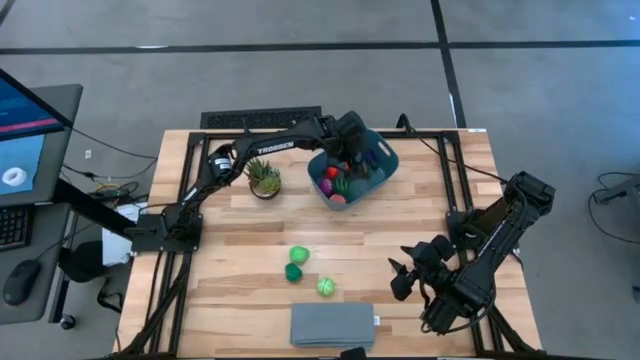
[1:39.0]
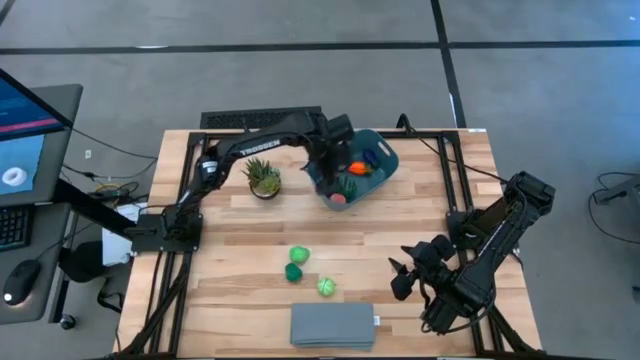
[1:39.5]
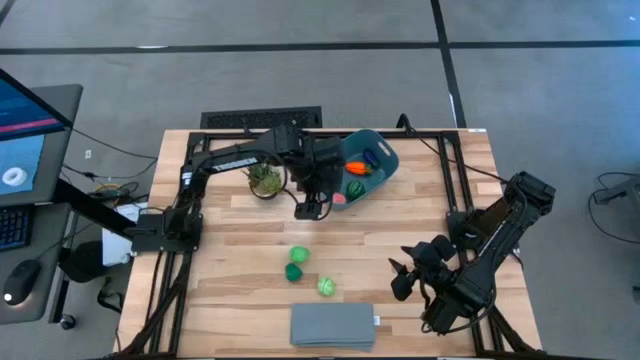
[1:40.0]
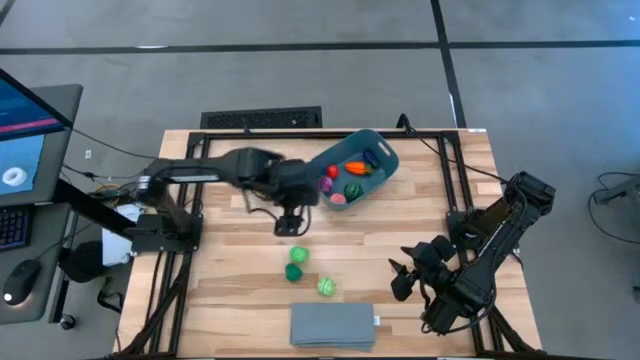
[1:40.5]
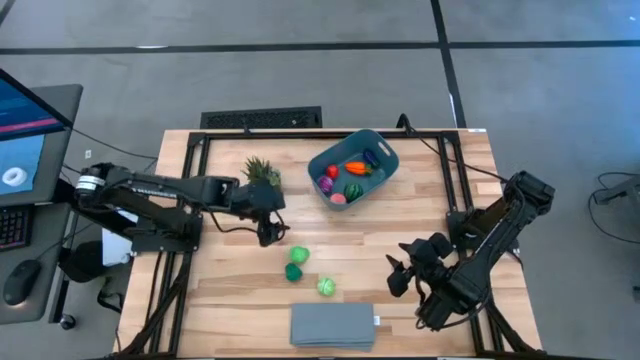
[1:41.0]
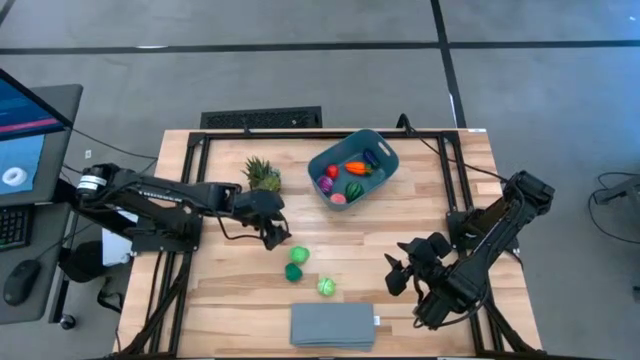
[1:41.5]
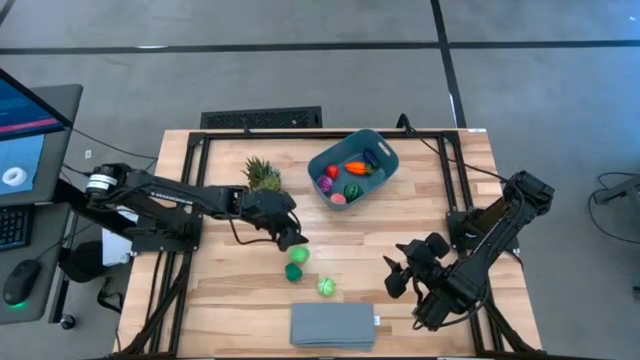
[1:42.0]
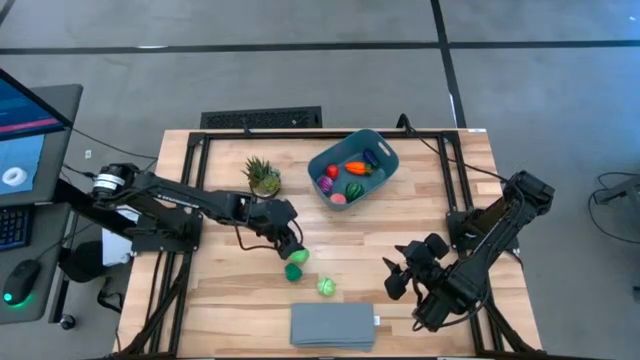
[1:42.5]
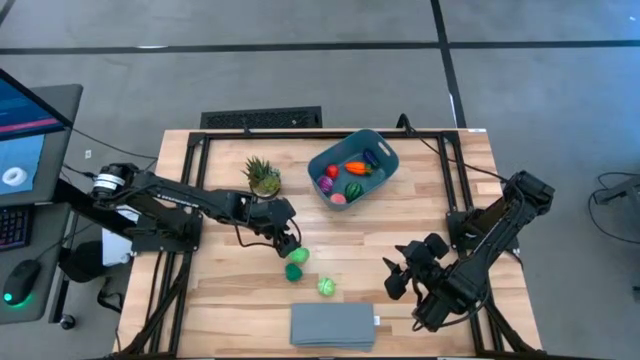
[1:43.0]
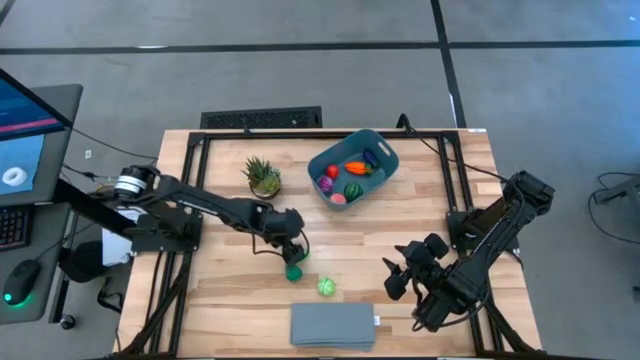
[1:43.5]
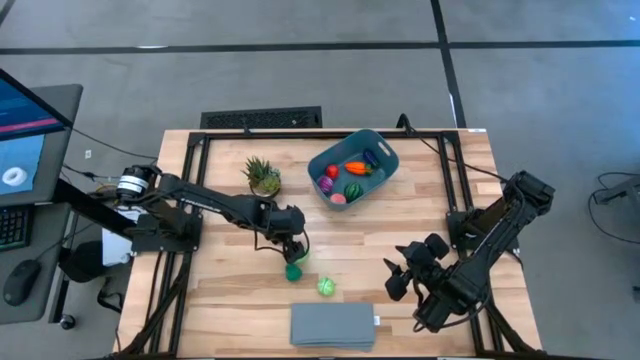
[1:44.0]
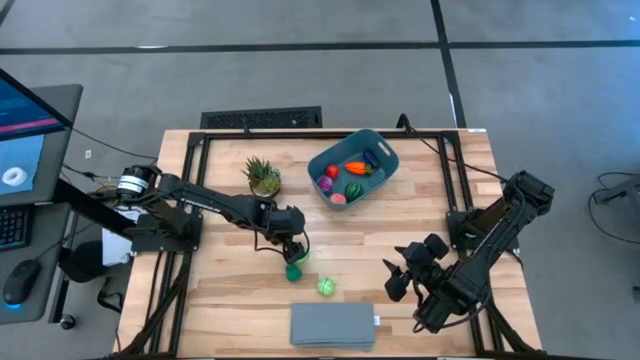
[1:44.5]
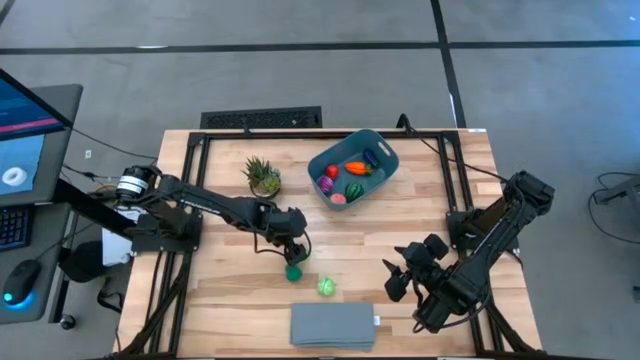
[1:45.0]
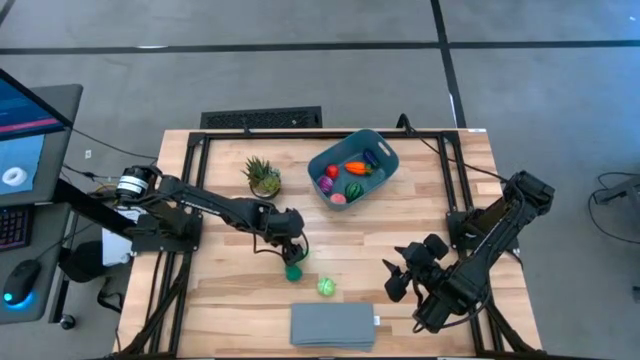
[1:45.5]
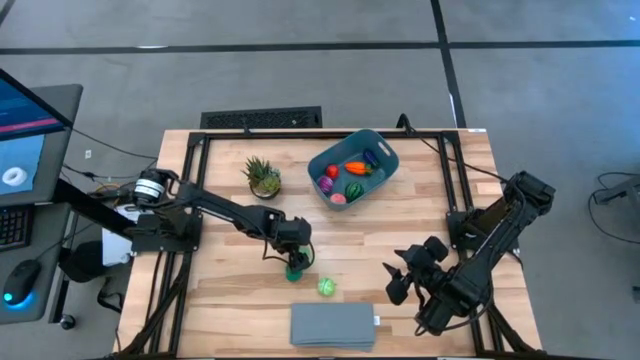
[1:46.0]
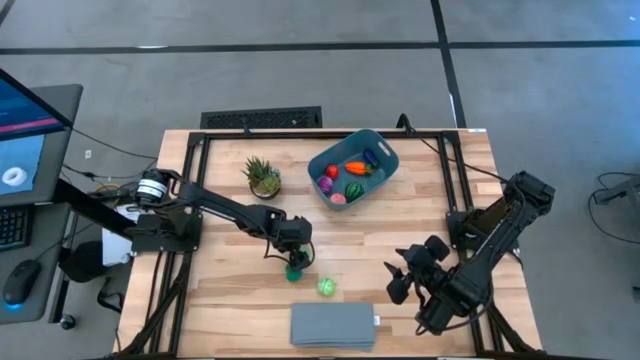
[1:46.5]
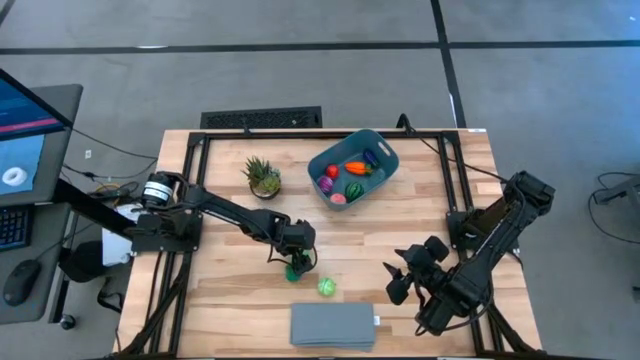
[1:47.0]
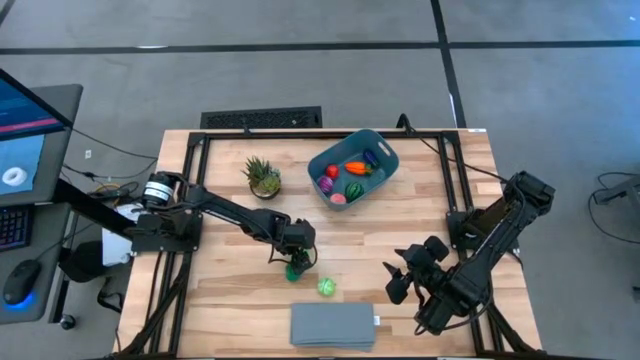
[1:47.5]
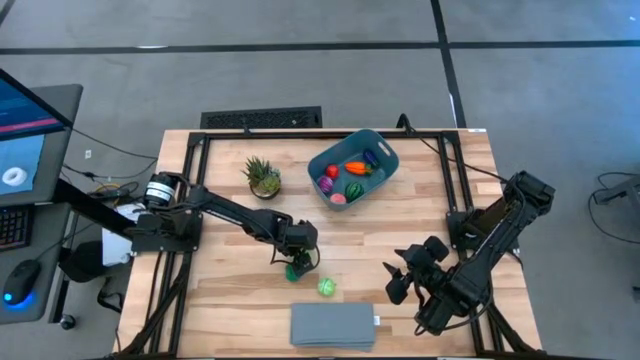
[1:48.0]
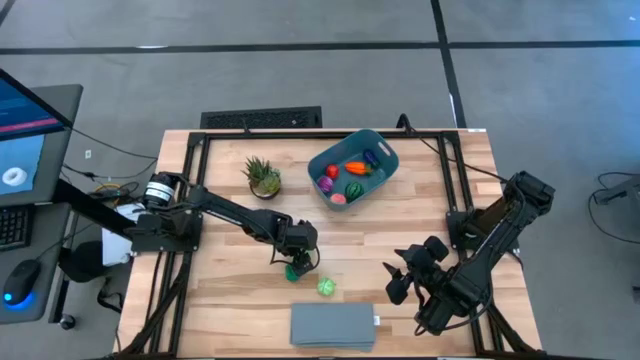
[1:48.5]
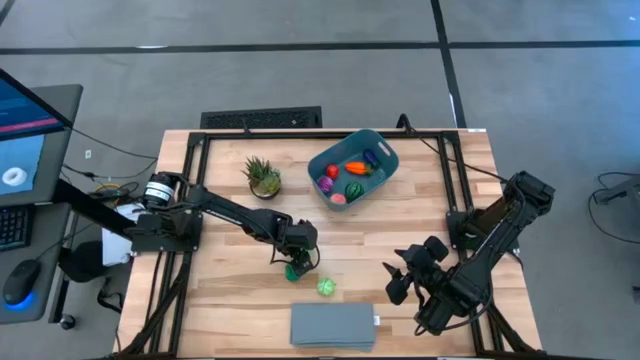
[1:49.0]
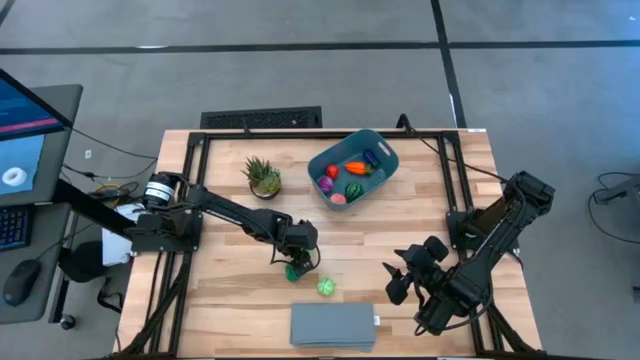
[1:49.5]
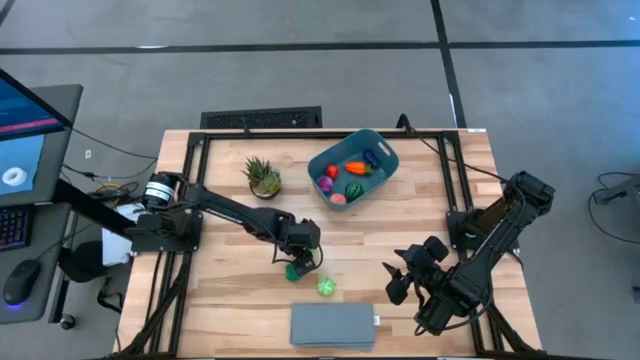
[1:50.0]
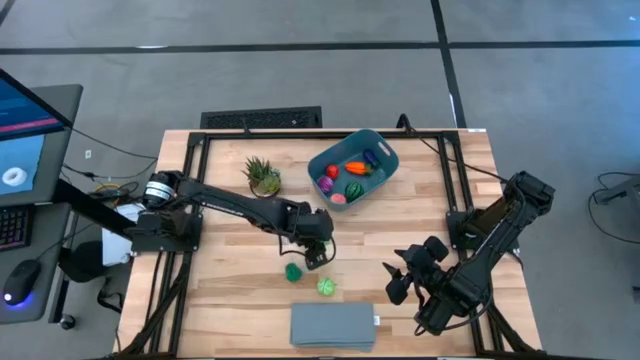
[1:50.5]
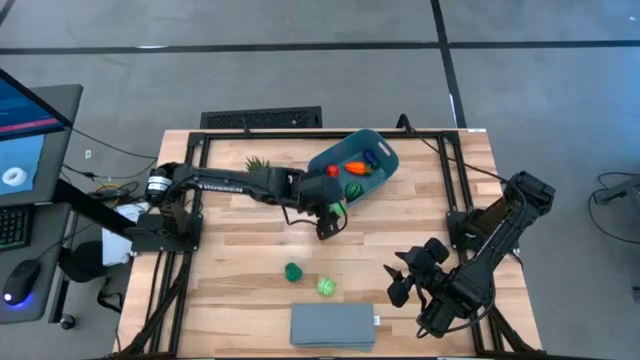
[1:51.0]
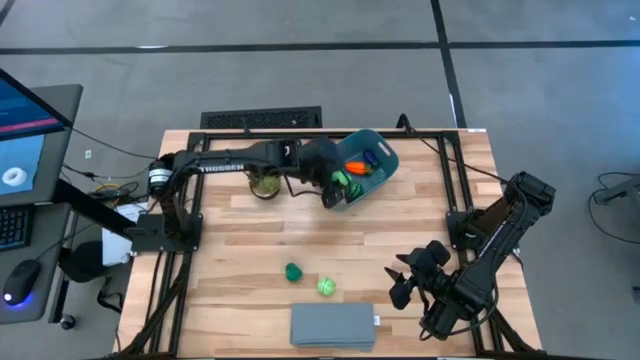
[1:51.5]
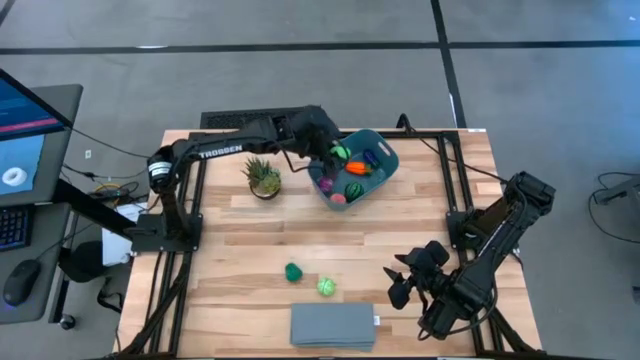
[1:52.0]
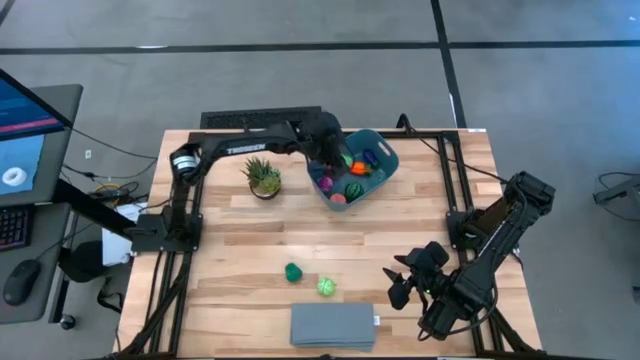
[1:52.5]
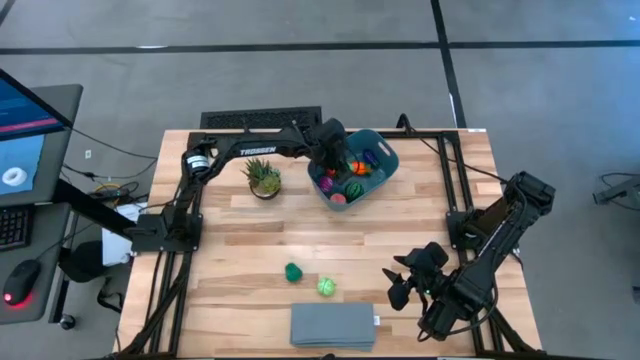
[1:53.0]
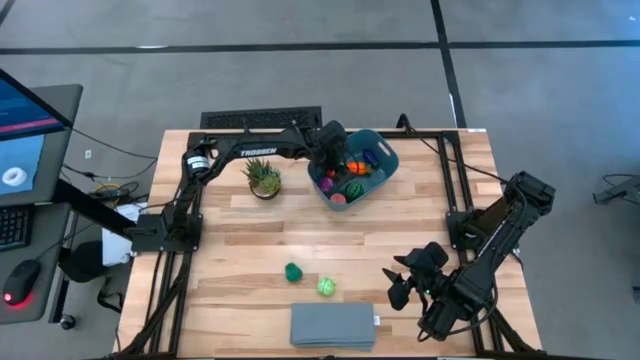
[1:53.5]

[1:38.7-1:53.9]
Task: Pick and placing Produce into tupperware
Put the pear into the bin

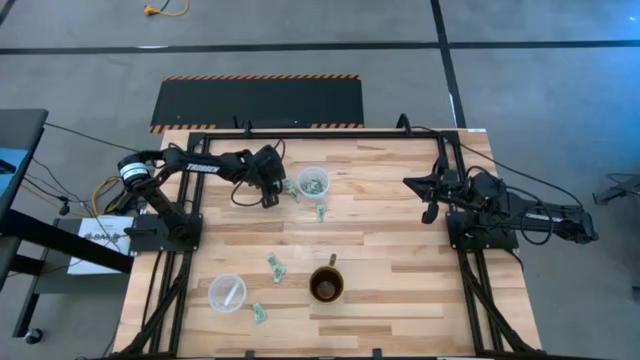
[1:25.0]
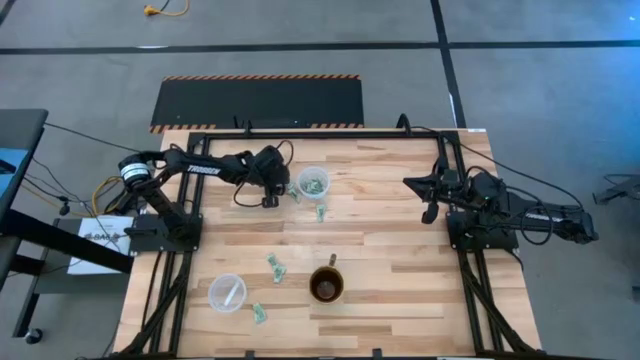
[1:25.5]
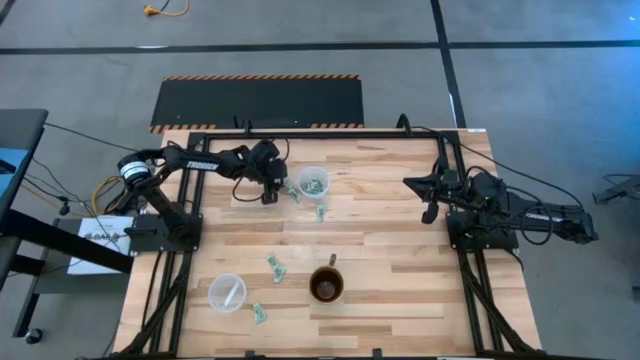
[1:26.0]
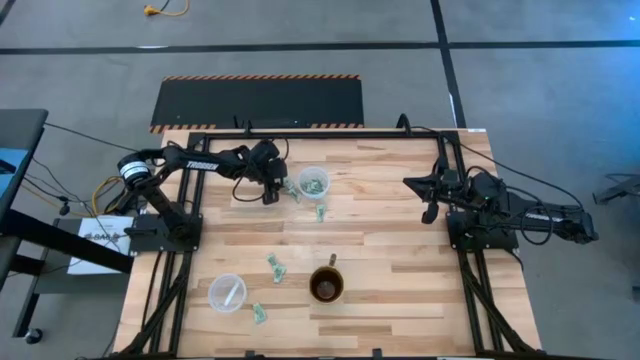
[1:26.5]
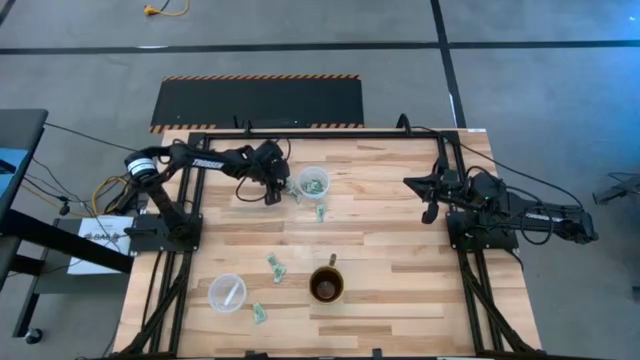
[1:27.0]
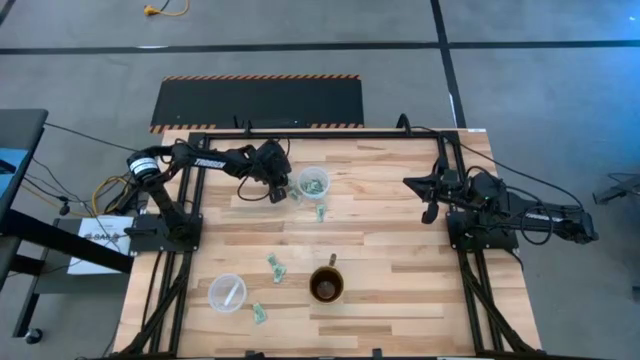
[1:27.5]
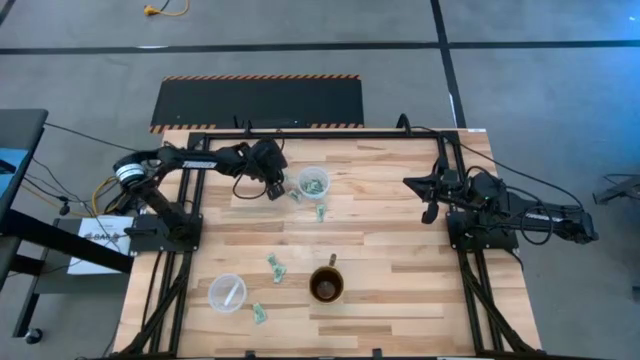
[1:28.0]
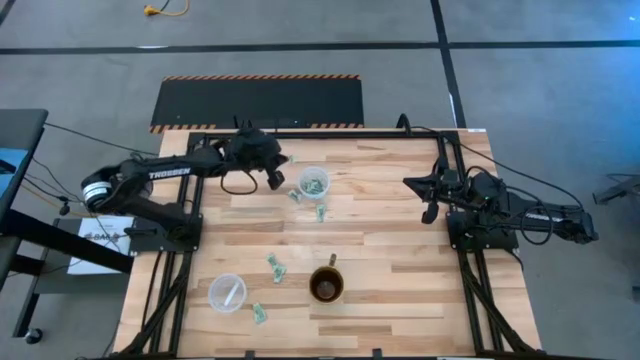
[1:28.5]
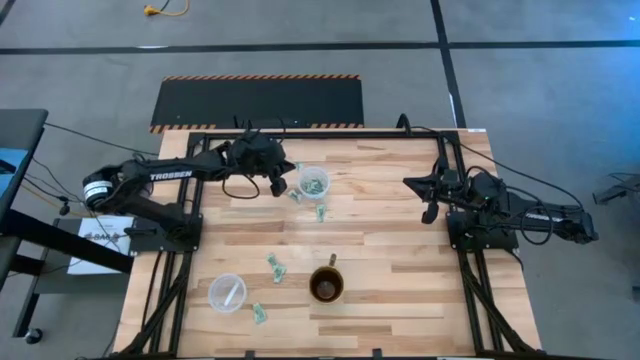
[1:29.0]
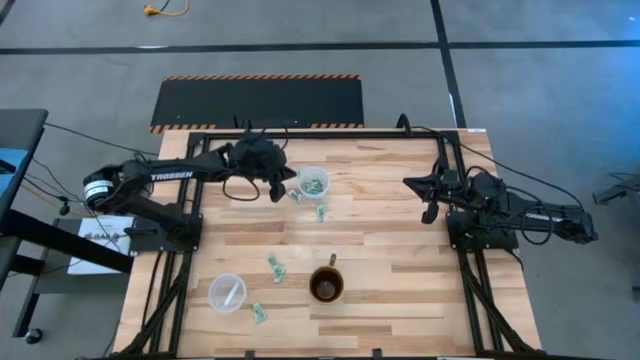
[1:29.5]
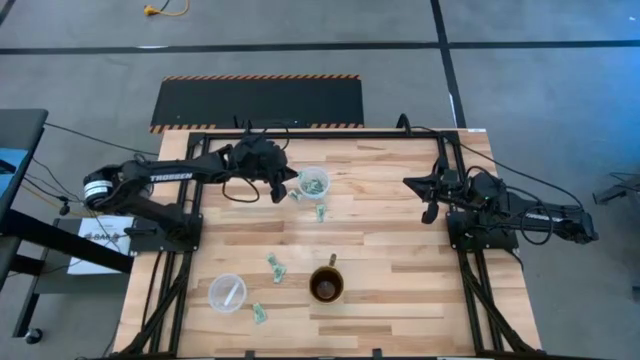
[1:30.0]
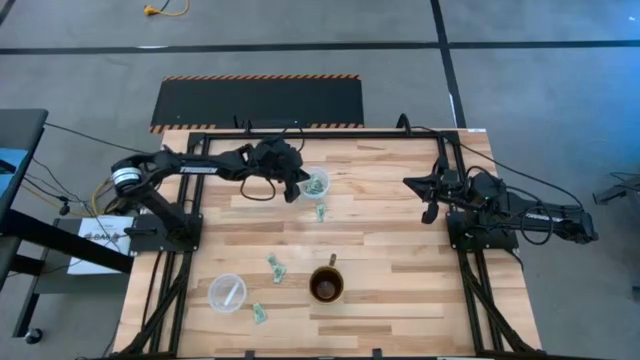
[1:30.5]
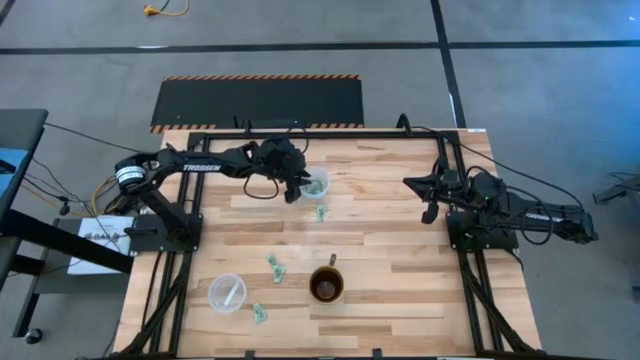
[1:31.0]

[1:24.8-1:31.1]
Task: Pick and place items into bin
Put the stevia packet into the top transparent bin
